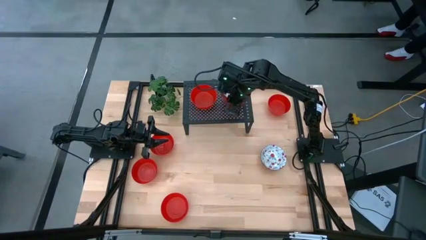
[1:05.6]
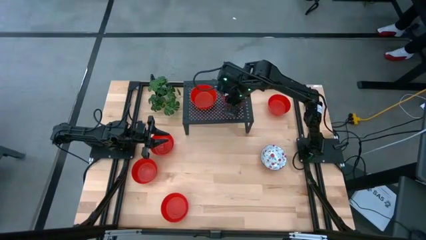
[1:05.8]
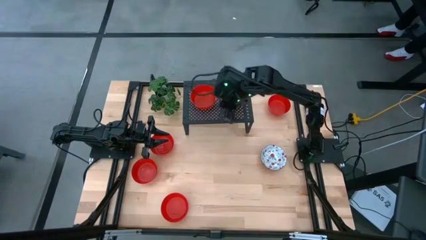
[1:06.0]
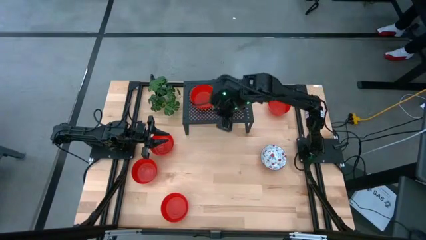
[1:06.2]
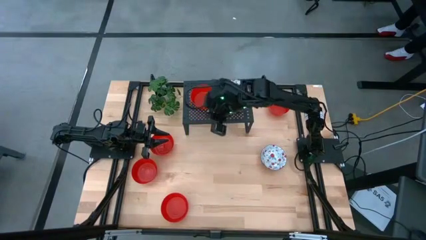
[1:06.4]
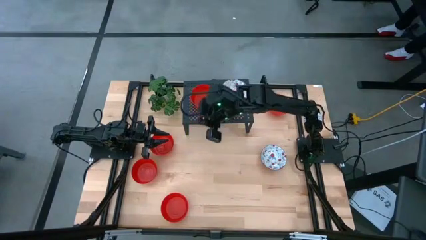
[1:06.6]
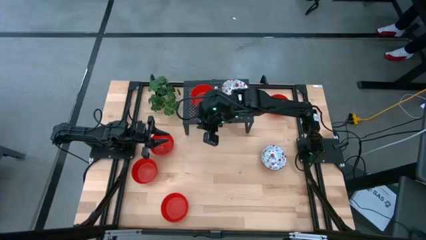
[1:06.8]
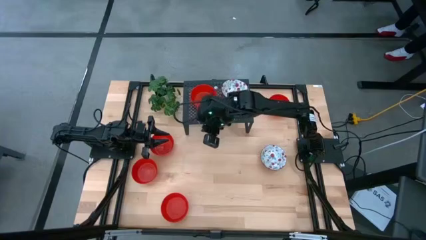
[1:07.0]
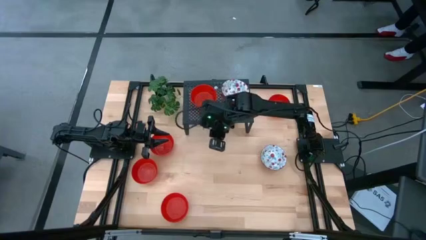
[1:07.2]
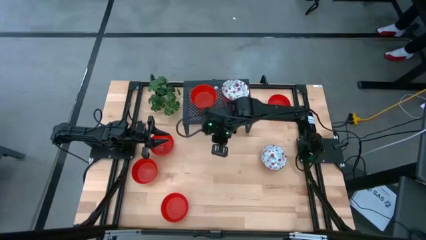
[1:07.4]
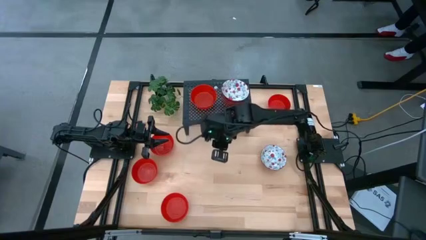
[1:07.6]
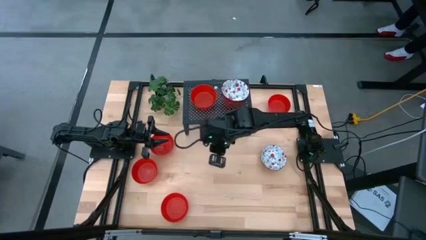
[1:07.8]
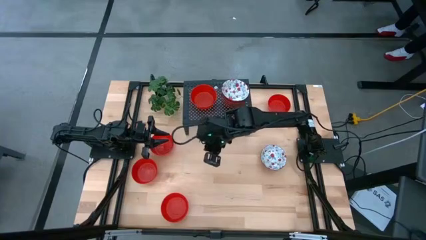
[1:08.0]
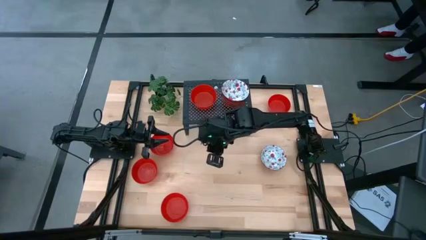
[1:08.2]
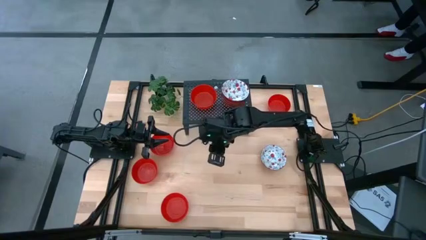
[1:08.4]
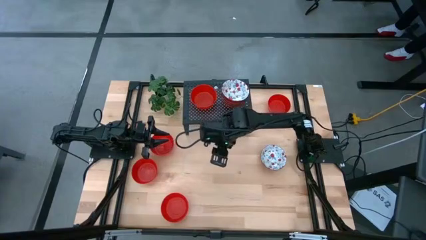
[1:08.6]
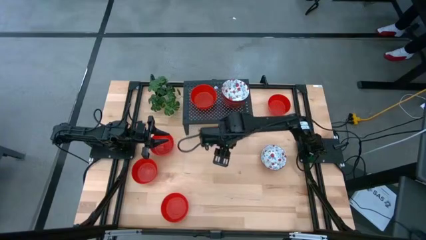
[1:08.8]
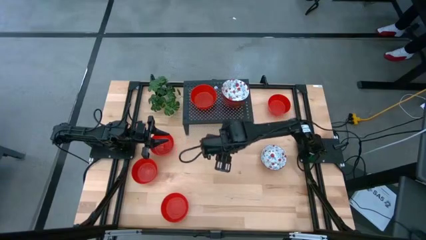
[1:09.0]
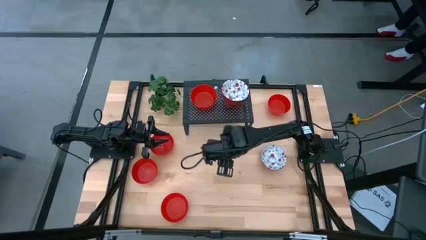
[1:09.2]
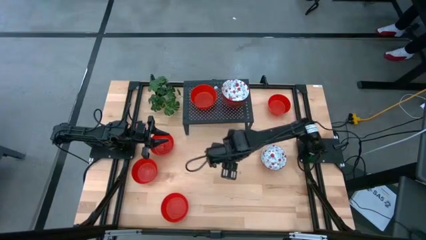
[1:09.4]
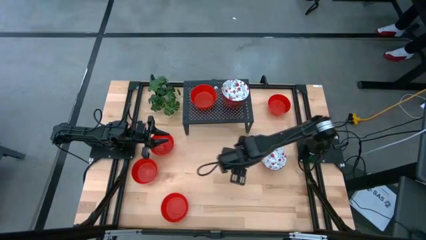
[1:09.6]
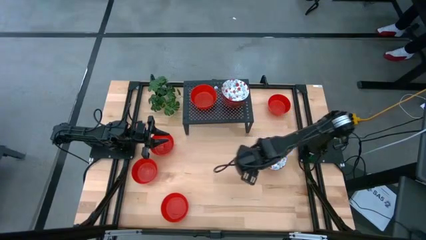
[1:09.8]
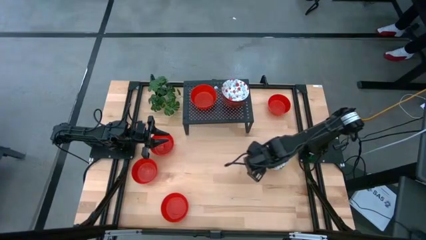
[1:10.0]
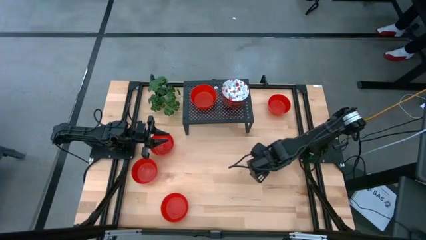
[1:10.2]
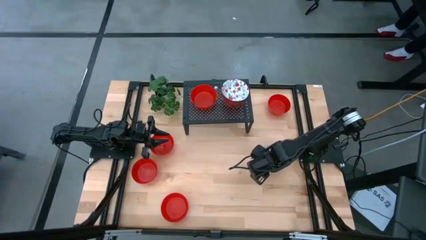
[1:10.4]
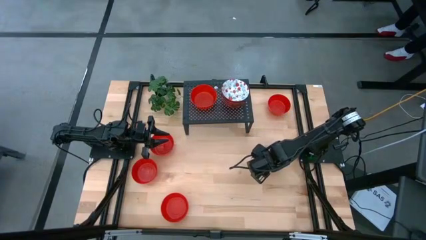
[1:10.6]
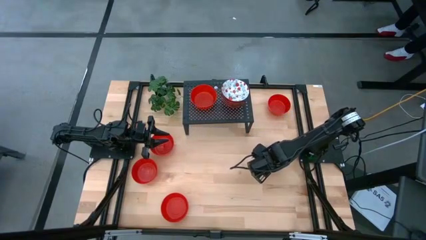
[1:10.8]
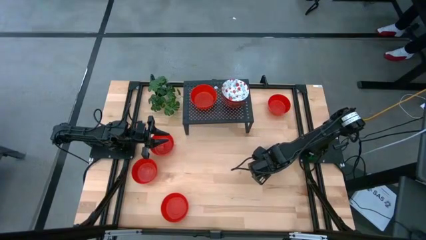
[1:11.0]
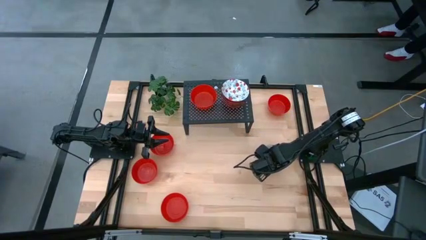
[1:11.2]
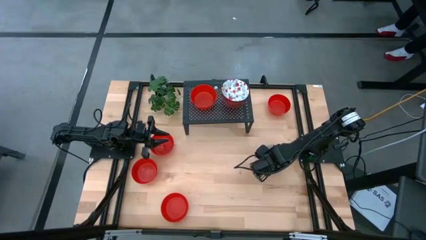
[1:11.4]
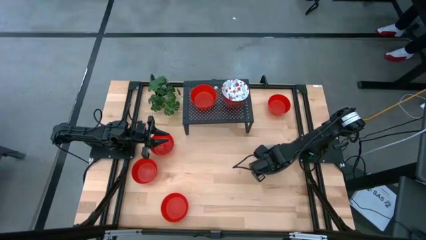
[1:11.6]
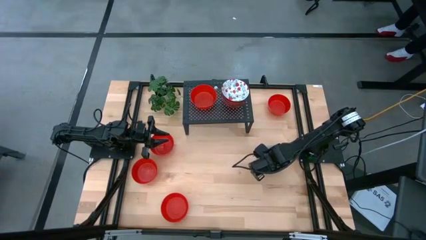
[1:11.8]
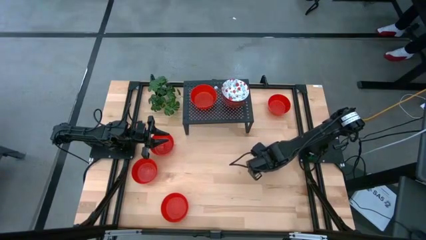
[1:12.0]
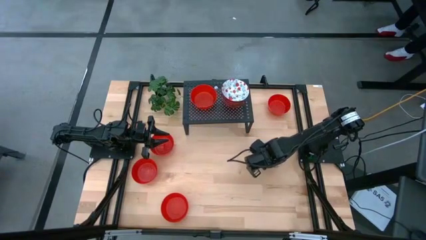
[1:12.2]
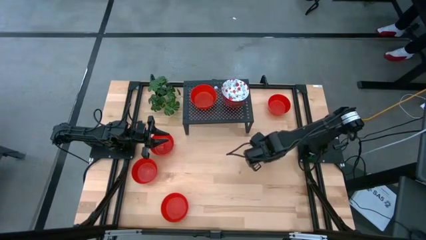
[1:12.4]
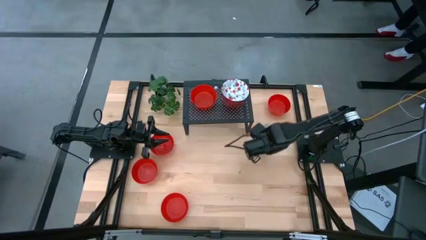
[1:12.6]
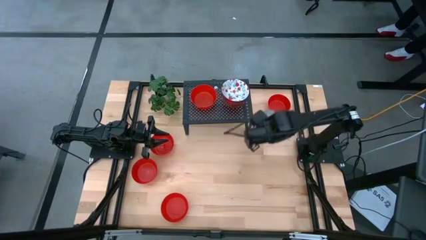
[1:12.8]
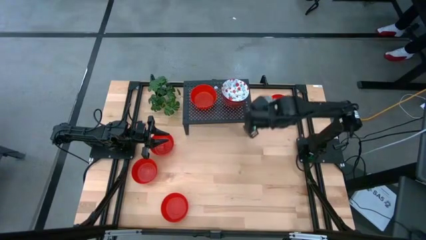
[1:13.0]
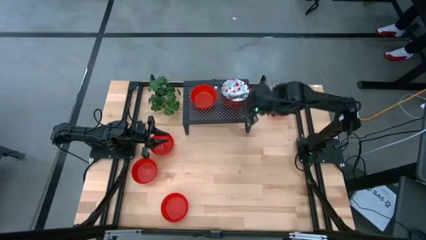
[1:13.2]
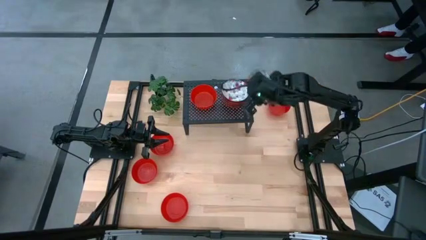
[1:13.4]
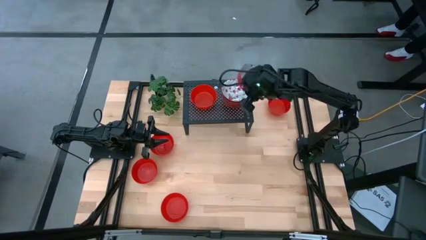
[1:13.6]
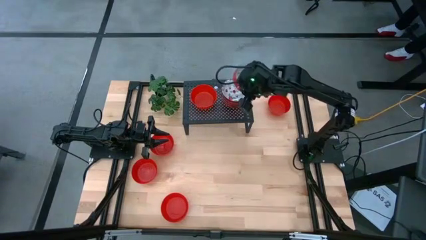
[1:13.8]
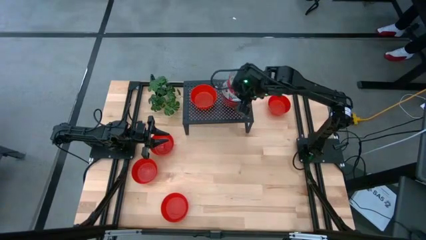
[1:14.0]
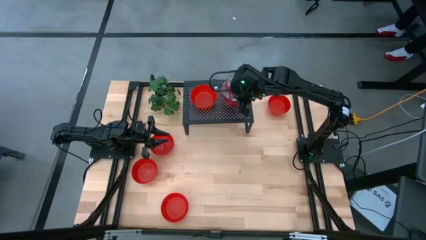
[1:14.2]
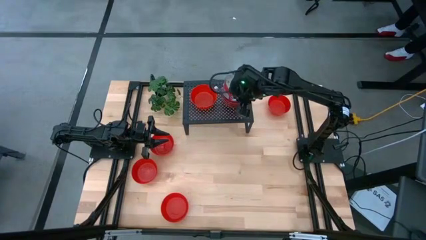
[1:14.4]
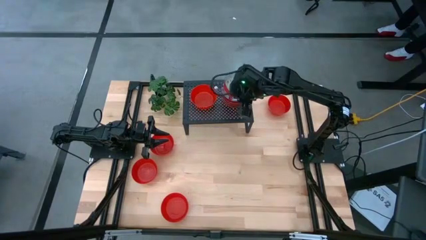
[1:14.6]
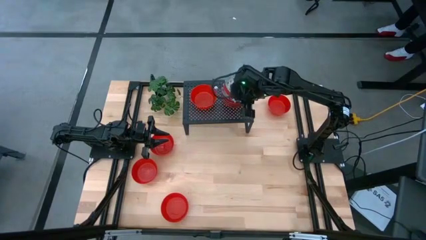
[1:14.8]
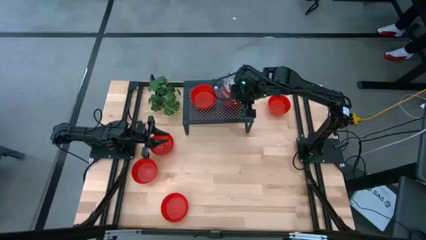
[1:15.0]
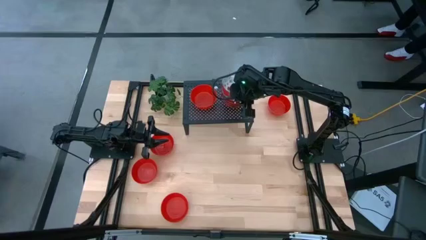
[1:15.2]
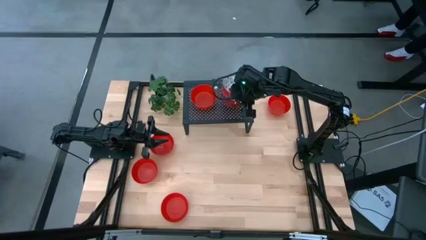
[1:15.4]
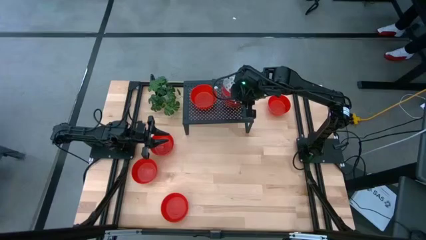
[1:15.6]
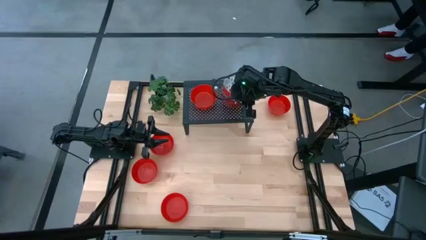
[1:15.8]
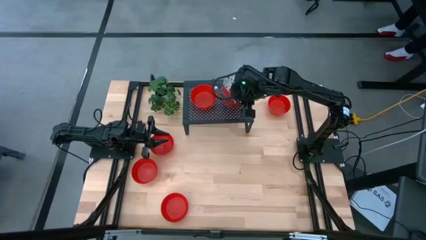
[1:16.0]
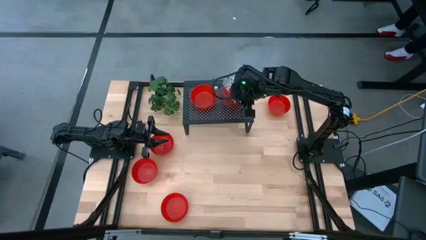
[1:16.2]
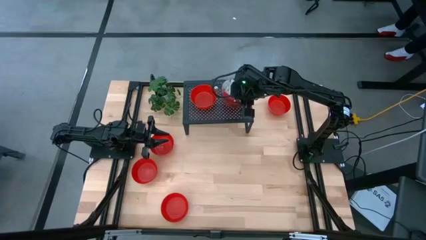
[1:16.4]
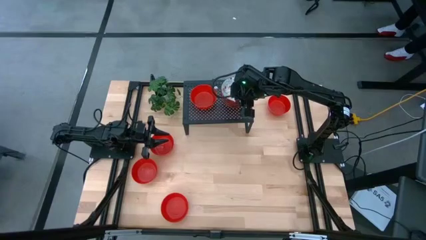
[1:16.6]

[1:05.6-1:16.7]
Task: Pick & Place Mini bowls
Stack the white bowl on the top of the white bowl on the shelf
